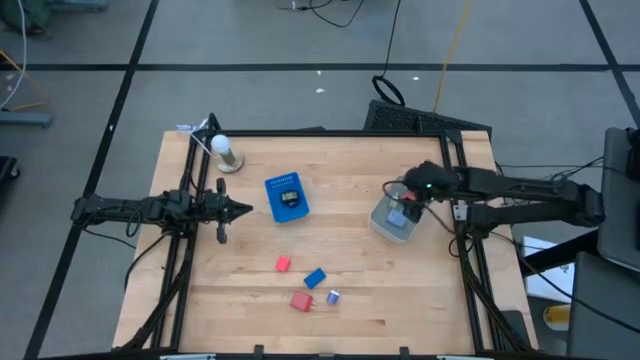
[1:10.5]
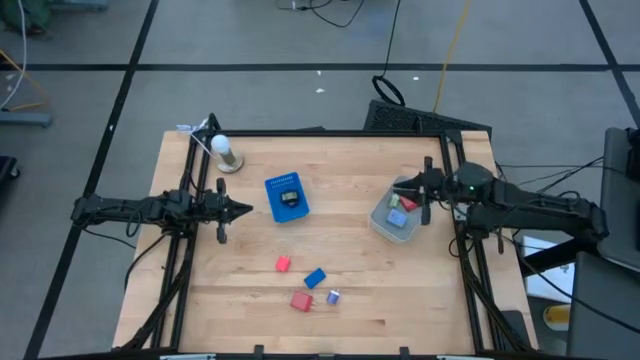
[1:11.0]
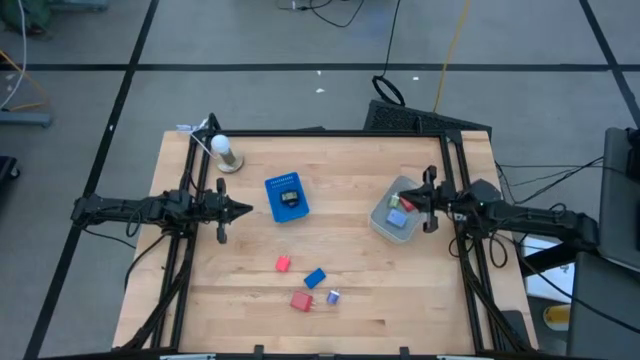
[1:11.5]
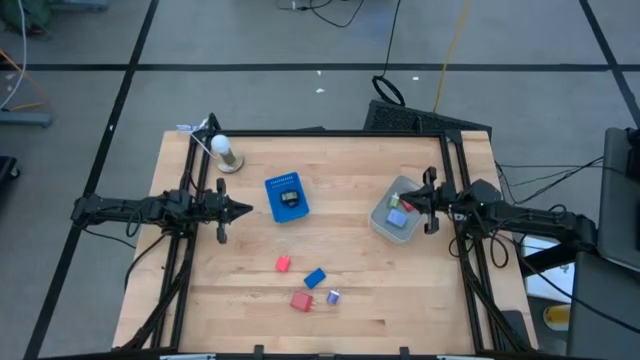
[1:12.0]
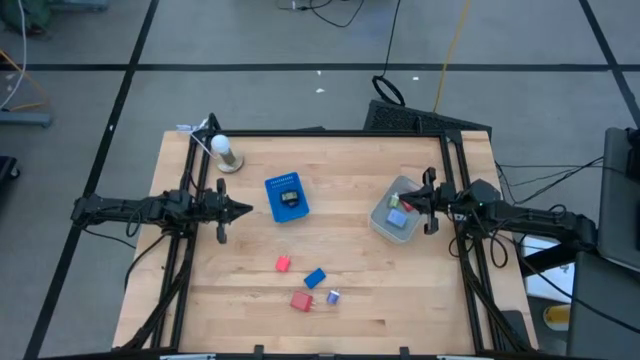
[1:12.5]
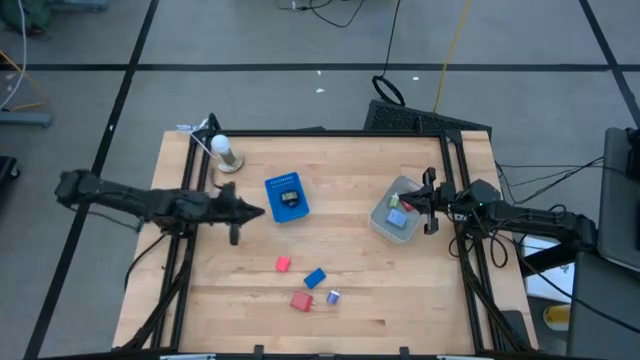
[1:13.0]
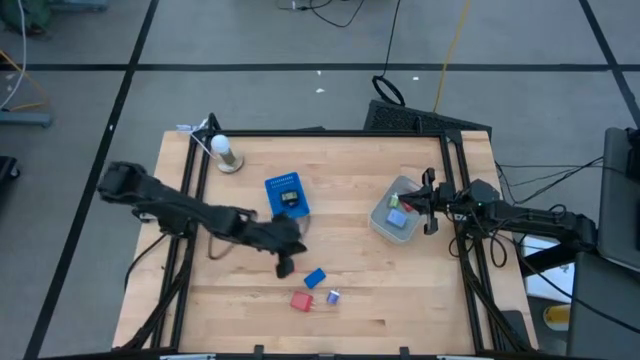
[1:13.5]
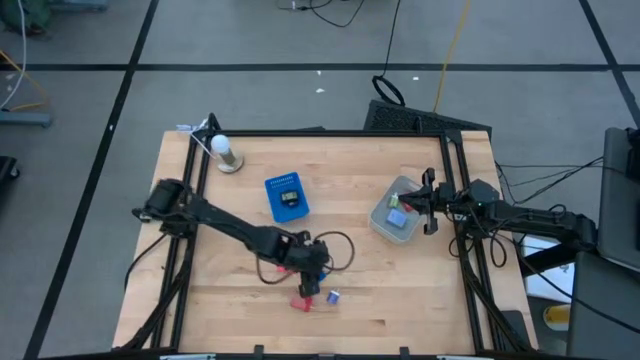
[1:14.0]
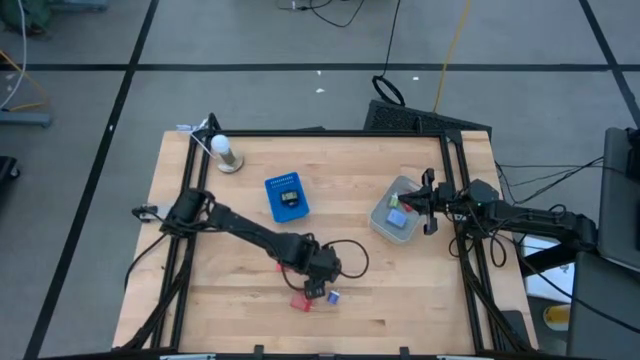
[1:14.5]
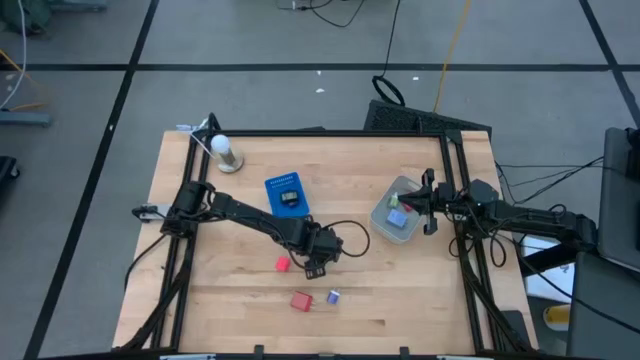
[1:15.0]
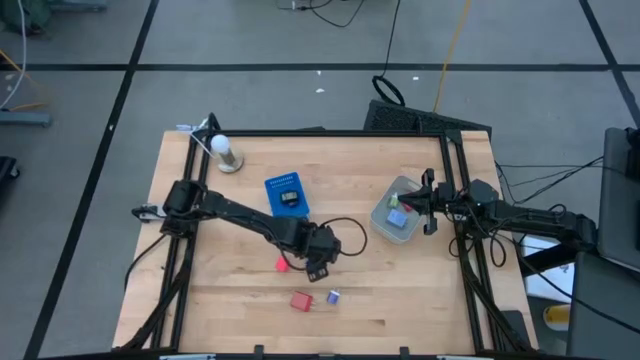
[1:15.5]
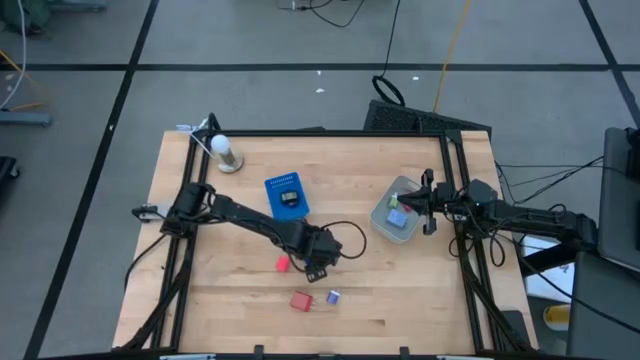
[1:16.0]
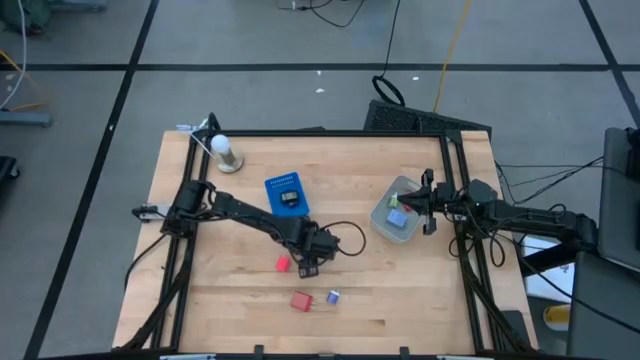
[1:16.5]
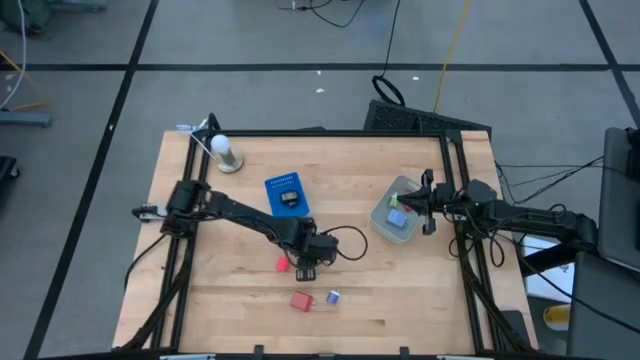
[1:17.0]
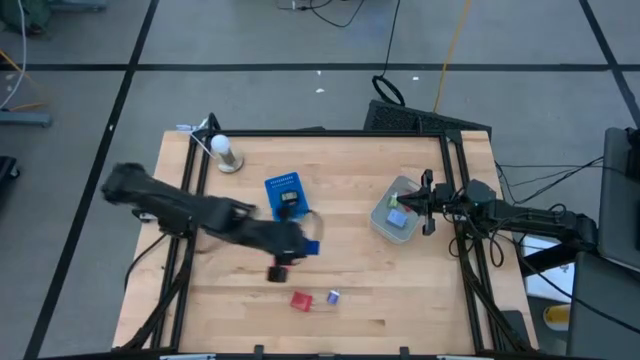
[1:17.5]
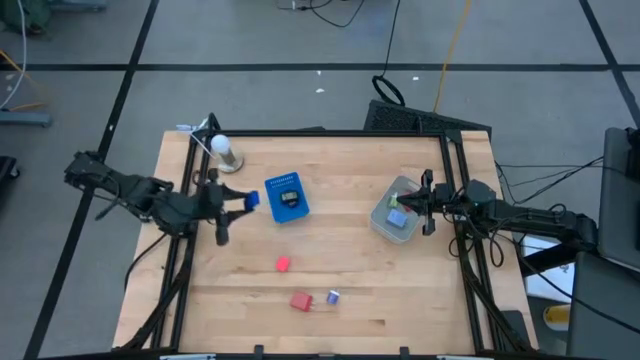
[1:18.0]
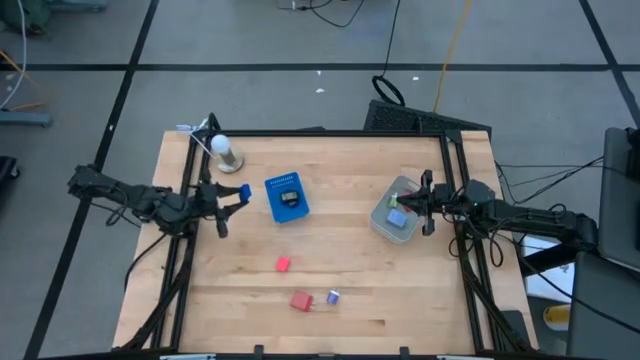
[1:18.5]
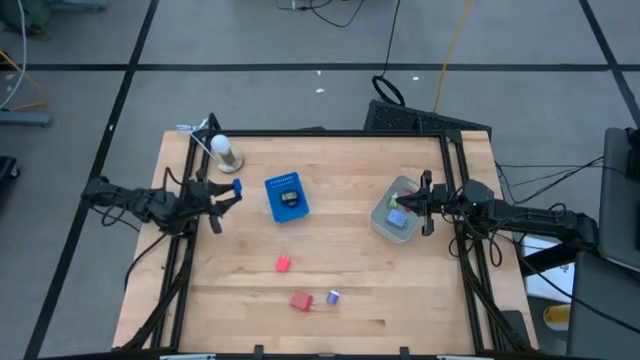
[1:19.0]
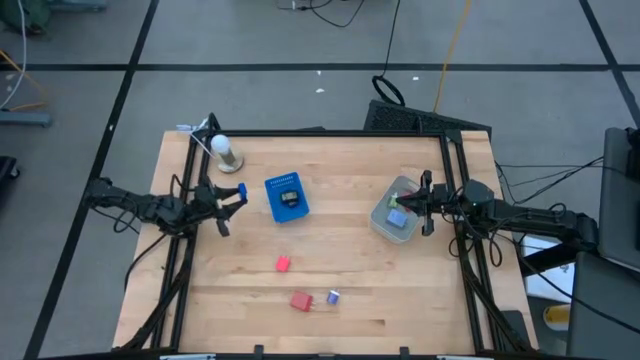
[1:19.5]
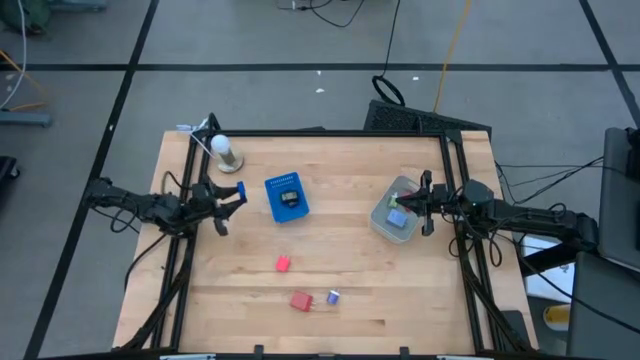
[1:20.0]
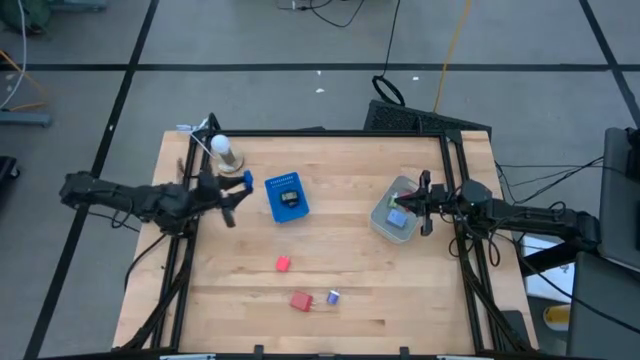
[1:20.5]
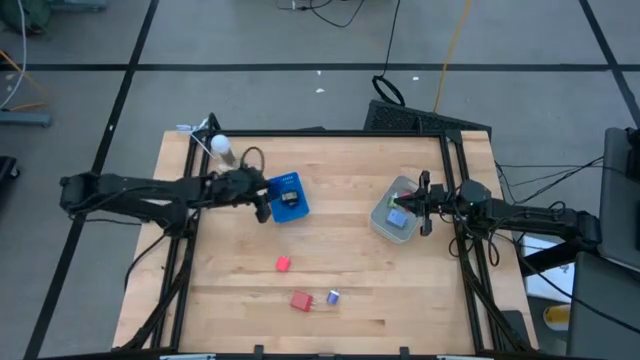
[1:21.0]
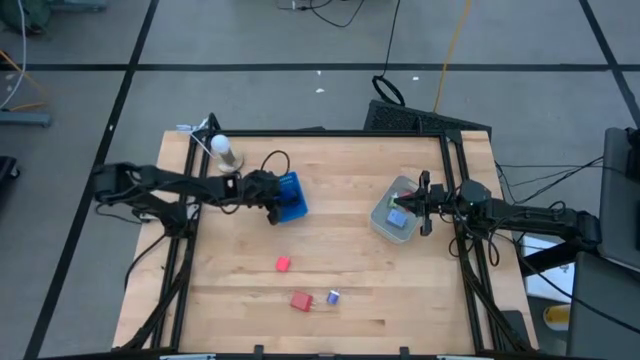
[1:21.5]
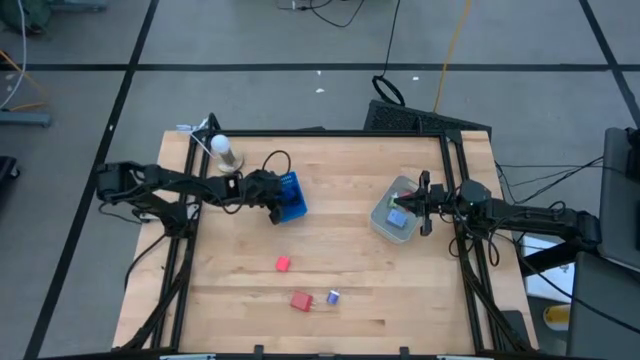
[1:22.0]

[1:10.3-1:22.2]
Task: Pick & Place Office items
Put the blue digital clock into the blue bin

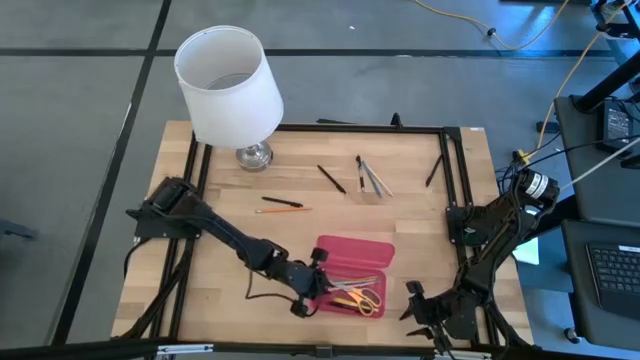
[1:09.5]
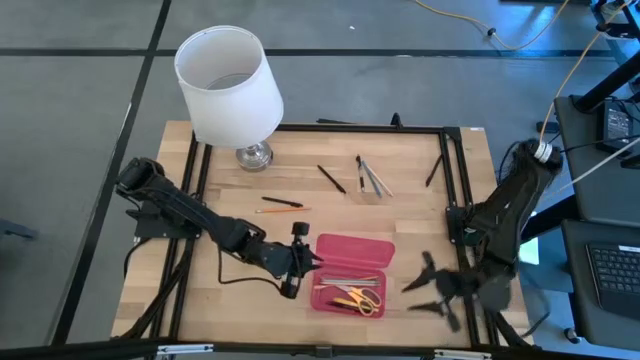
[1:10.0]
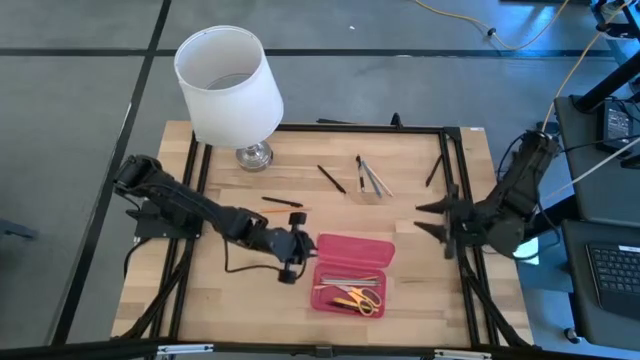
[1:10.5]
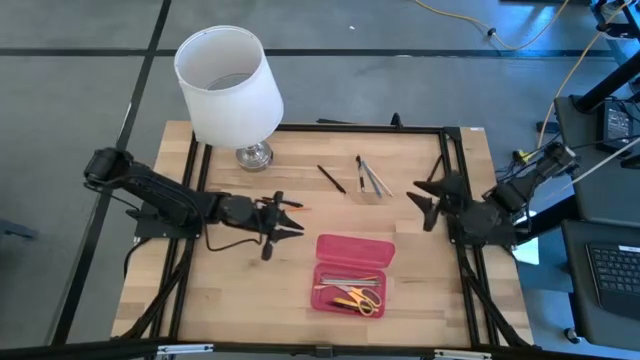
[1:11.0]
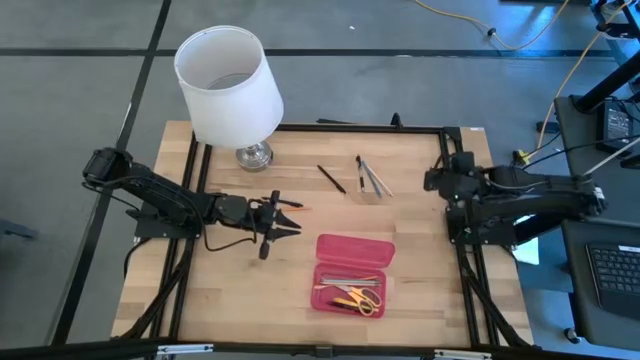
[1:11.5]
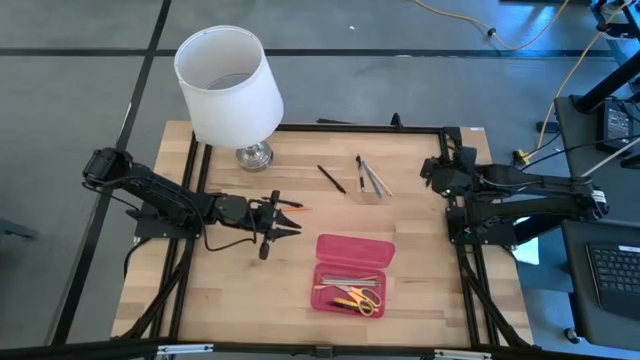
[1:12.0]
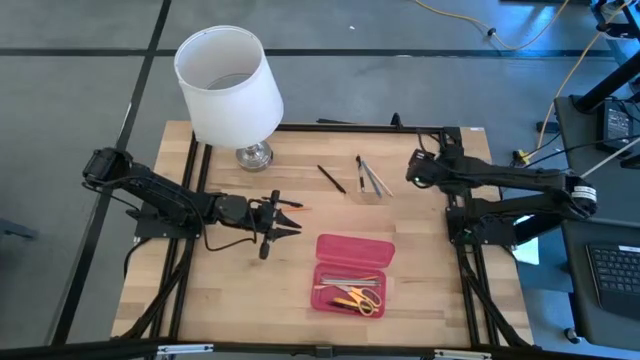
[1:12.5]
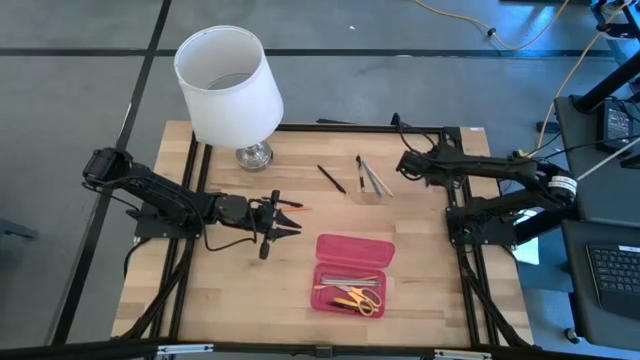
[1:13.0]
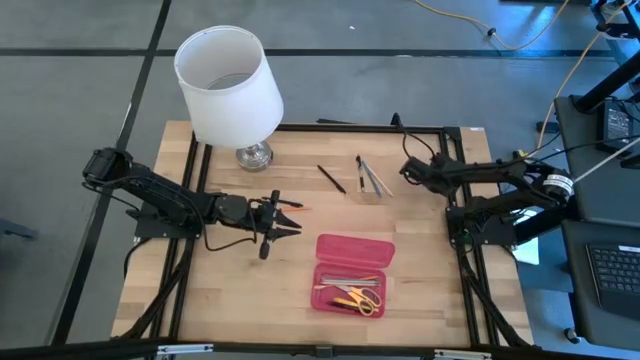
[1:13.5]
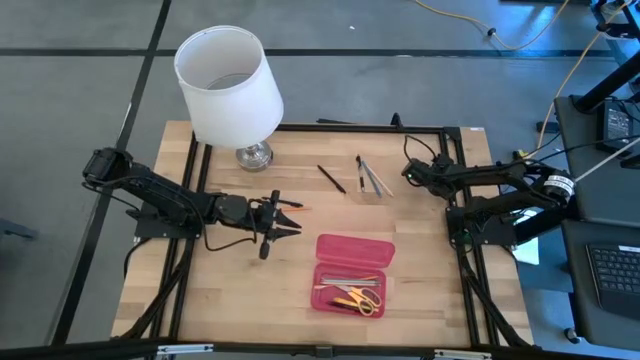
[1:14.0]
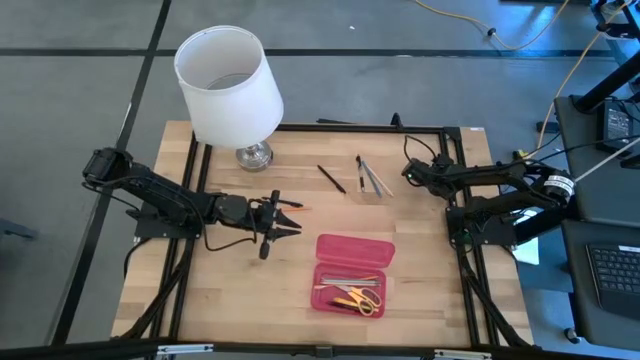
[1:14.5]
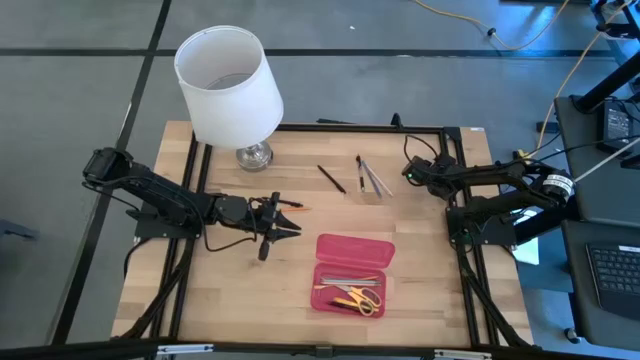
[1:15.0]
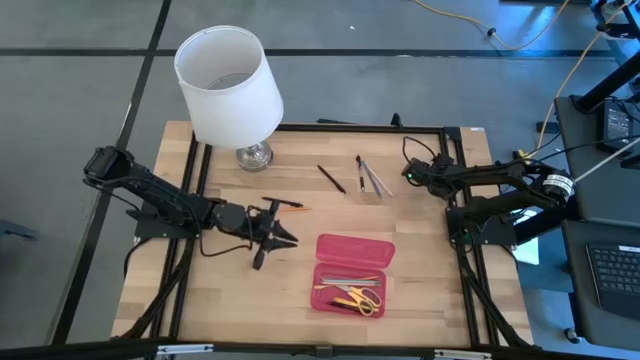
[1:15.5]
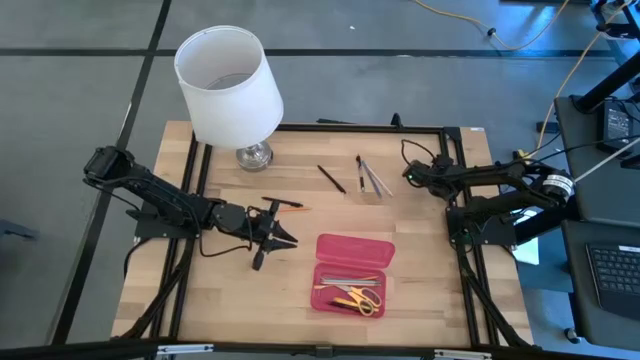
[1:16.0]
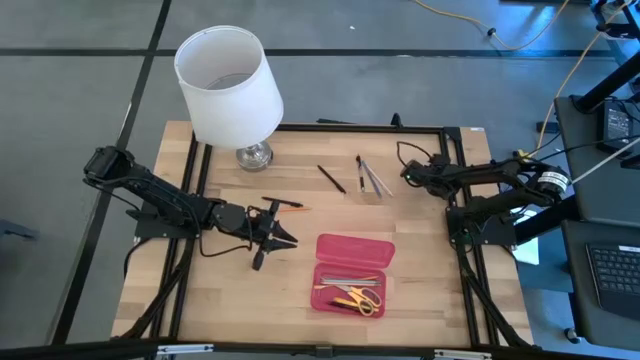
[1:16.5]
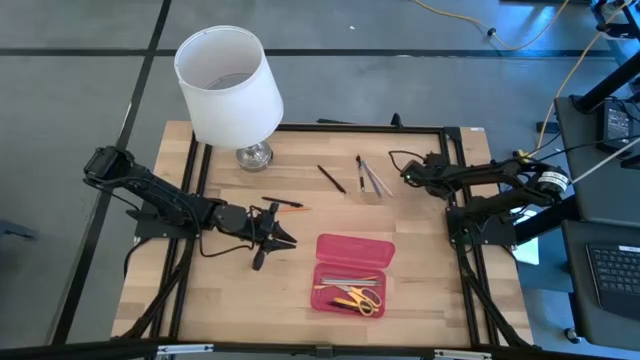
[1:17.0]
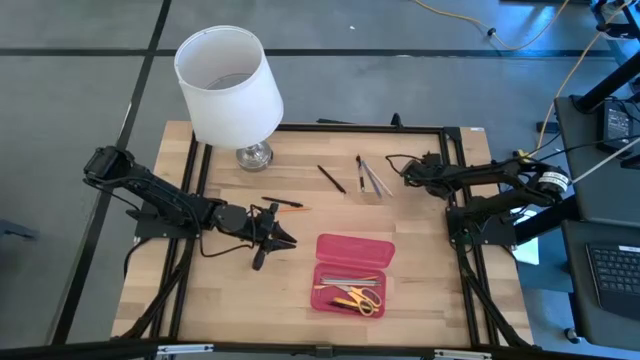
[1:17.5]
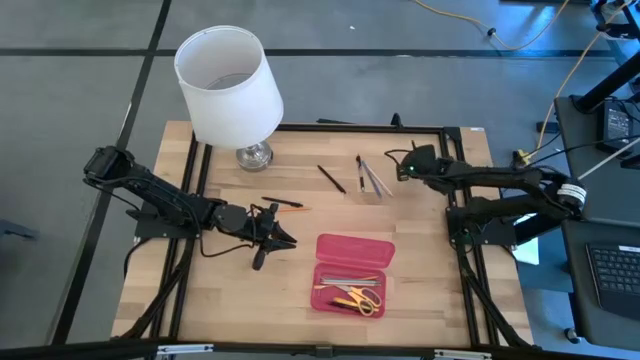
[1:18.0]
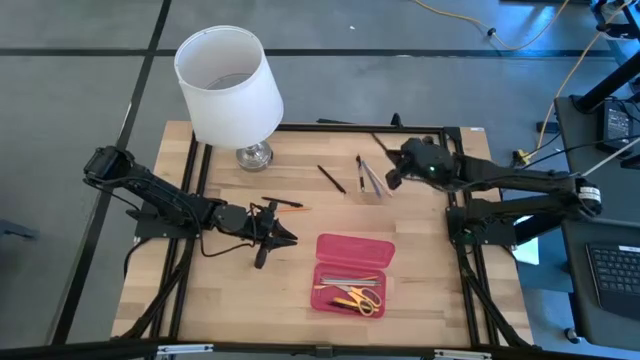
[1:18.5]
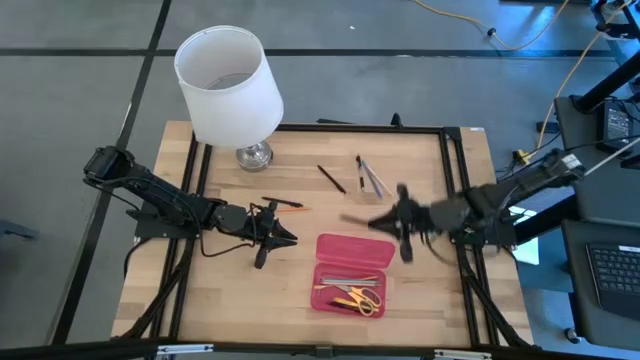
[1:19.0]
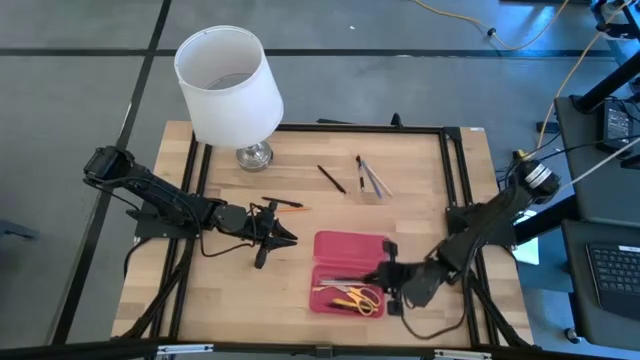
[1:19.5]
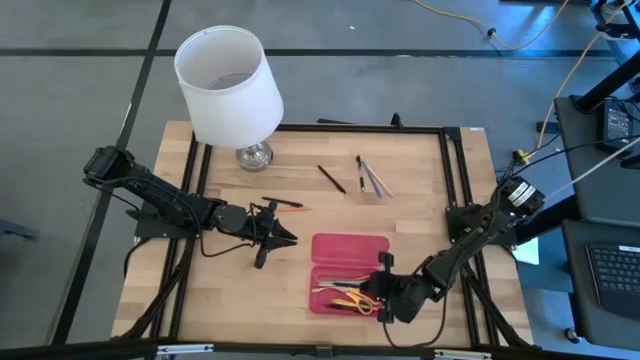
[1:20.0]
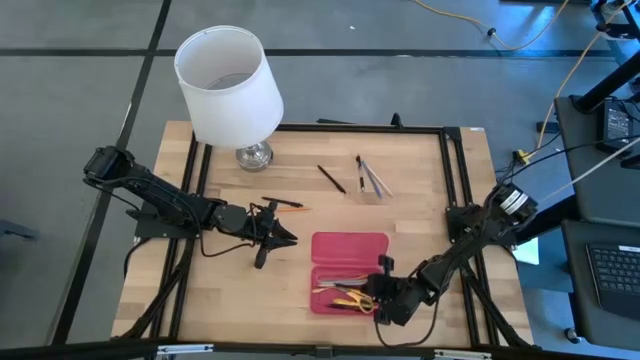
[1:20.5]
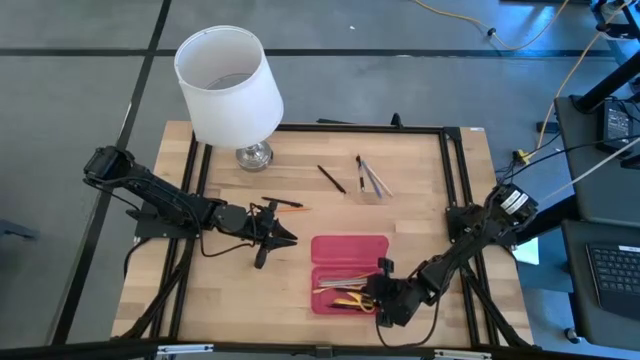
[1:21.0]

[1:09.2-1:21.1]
Task: Pick & place school supplies into a supply box
Put the black pen into the pink supply box
